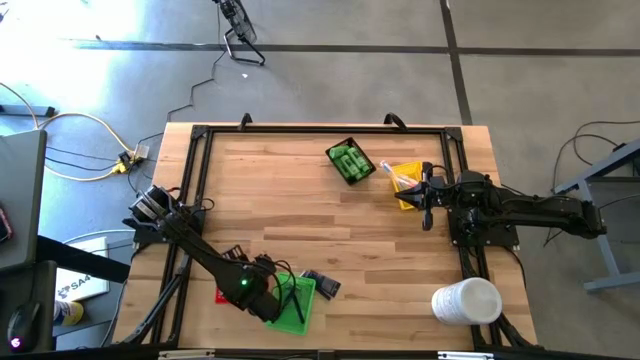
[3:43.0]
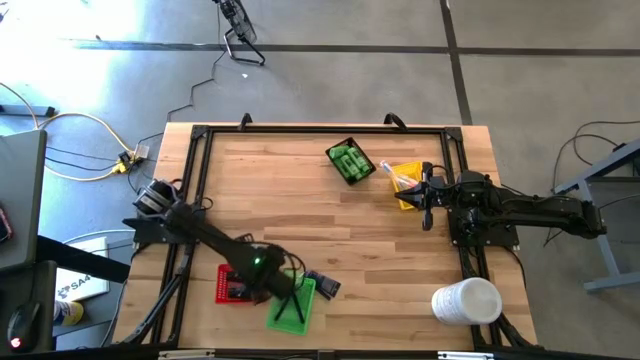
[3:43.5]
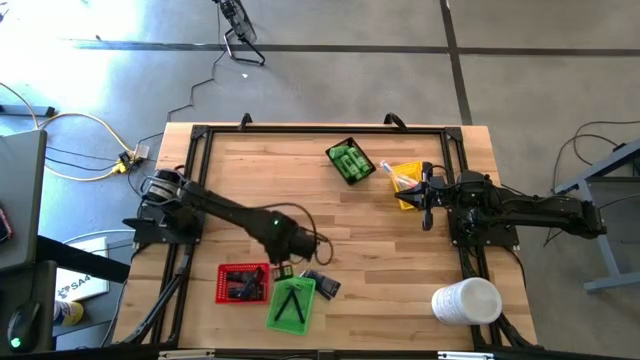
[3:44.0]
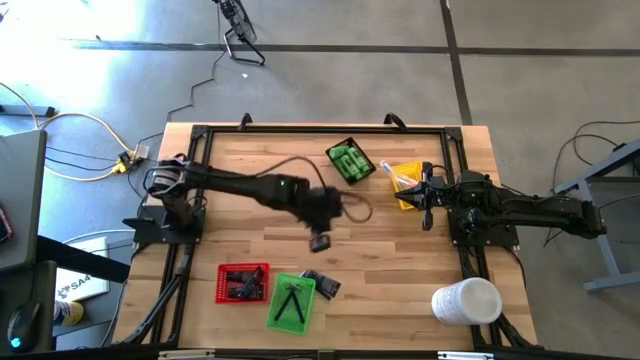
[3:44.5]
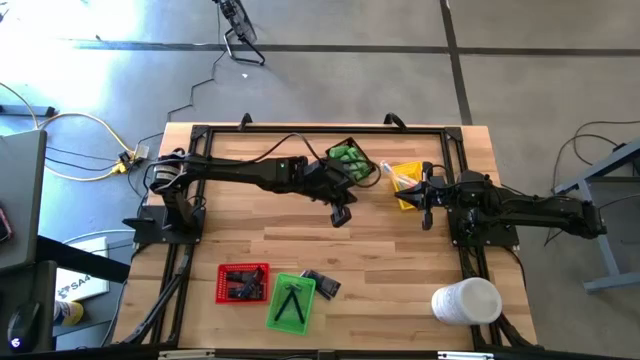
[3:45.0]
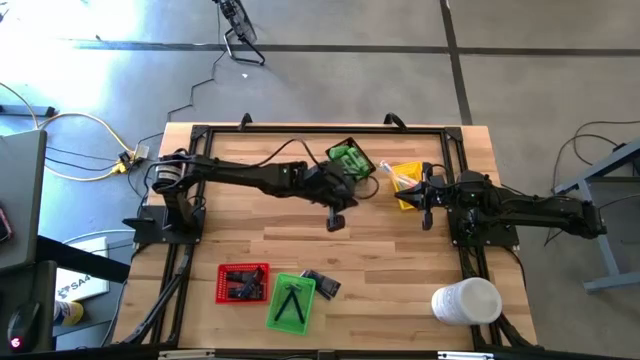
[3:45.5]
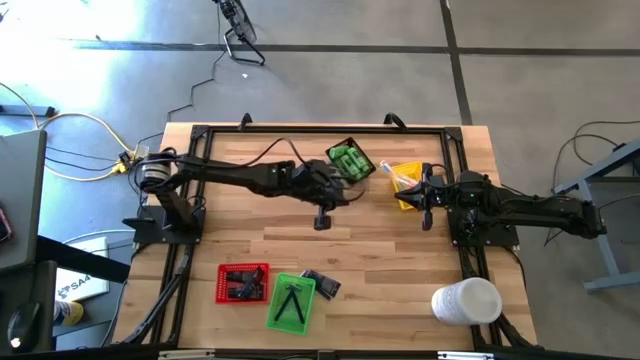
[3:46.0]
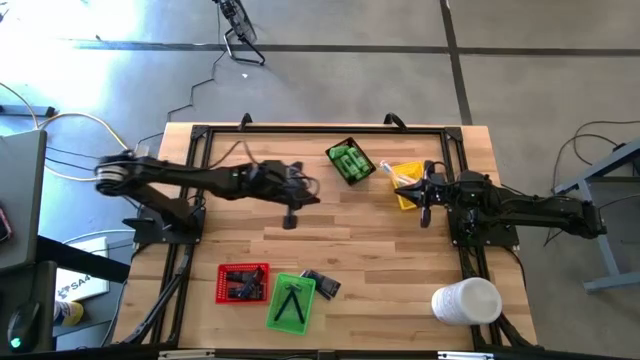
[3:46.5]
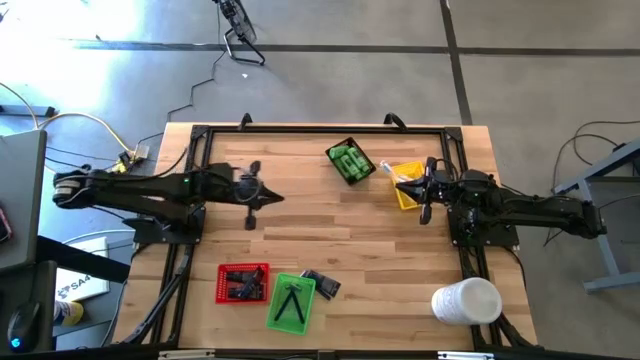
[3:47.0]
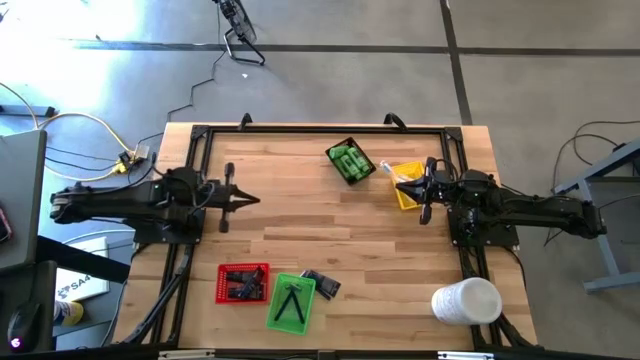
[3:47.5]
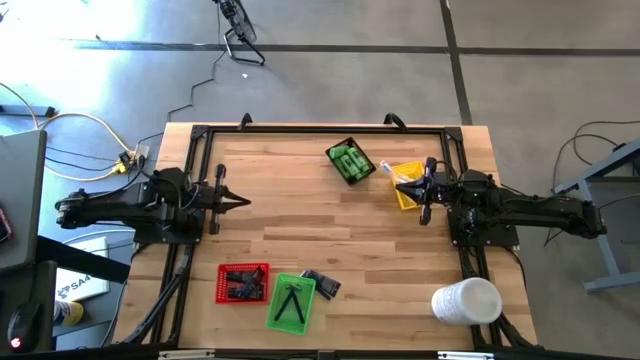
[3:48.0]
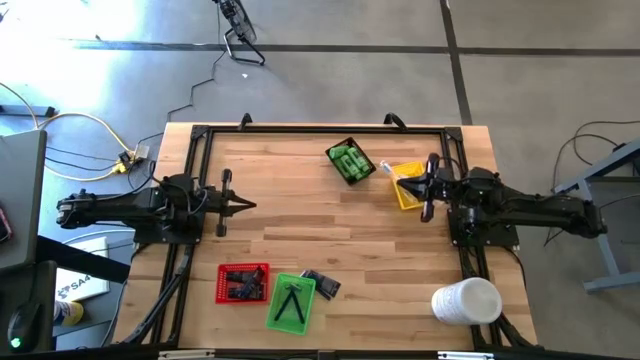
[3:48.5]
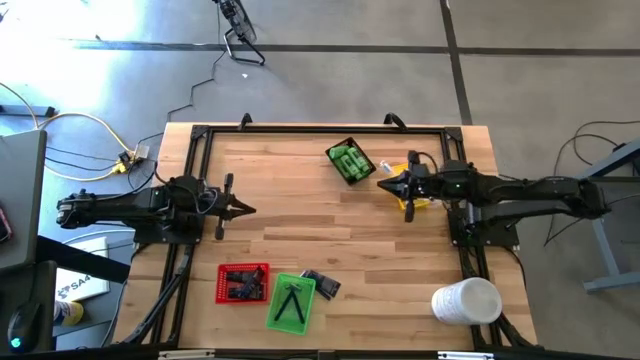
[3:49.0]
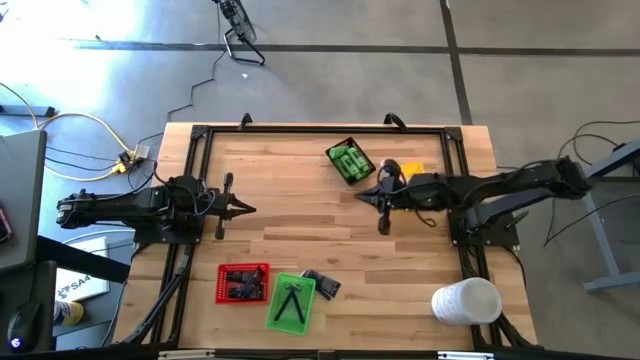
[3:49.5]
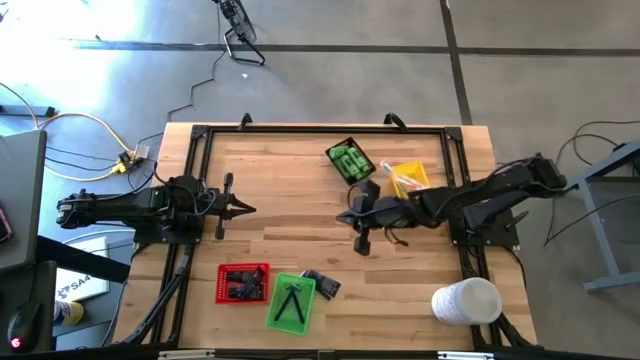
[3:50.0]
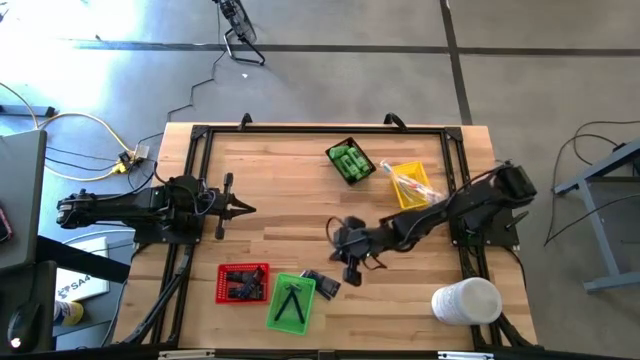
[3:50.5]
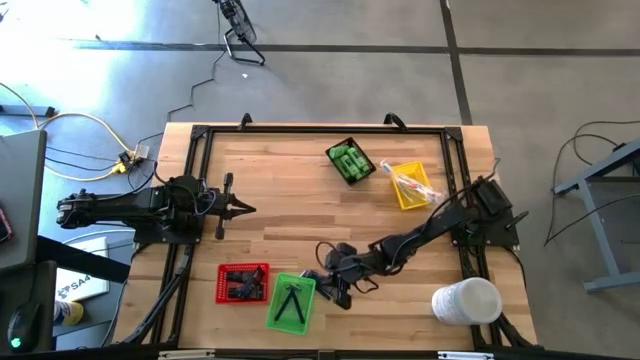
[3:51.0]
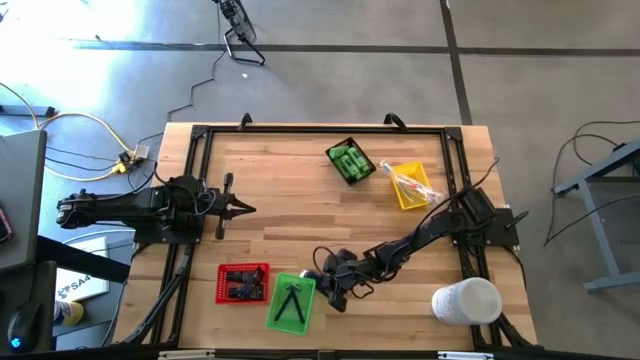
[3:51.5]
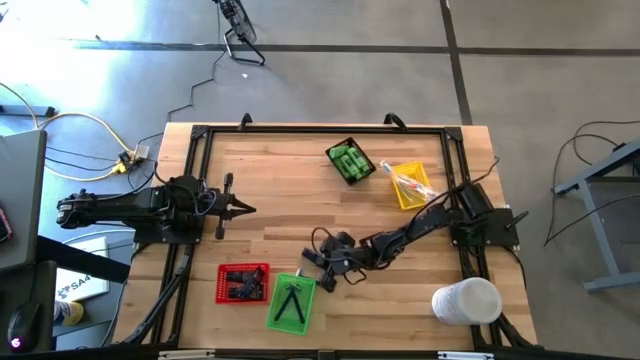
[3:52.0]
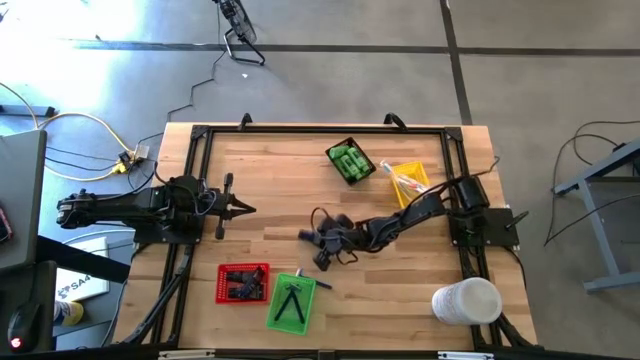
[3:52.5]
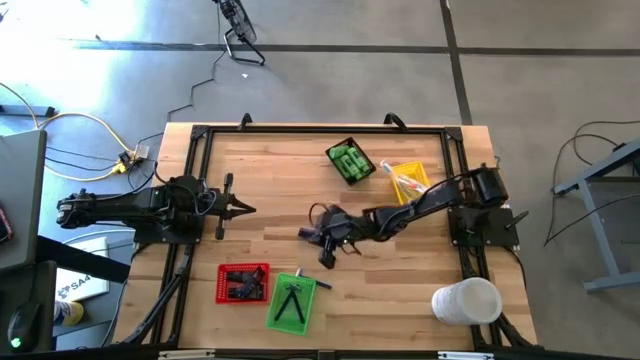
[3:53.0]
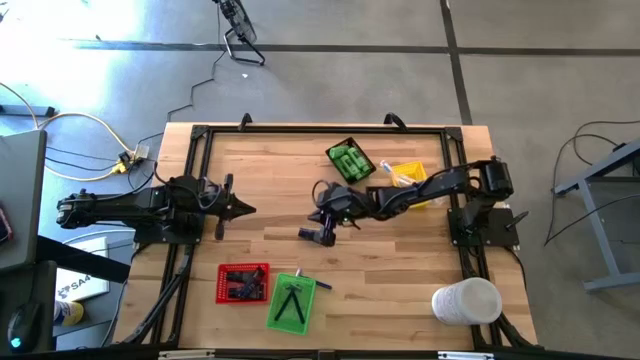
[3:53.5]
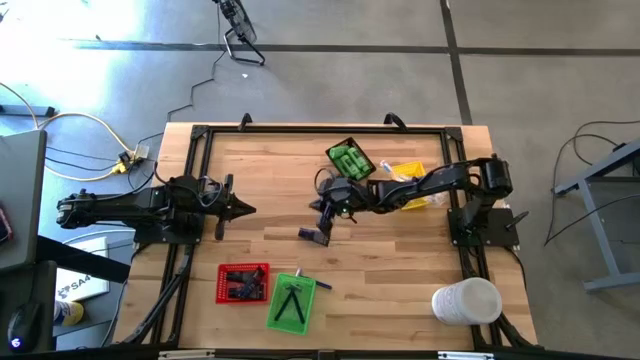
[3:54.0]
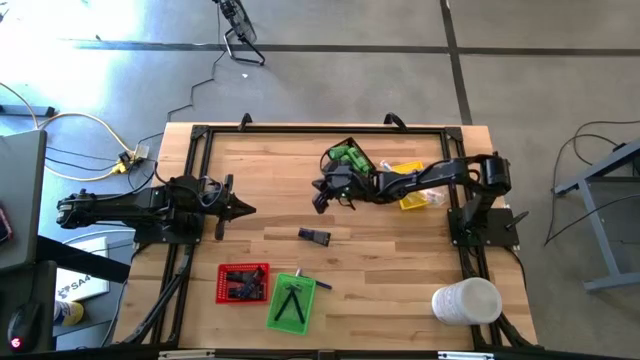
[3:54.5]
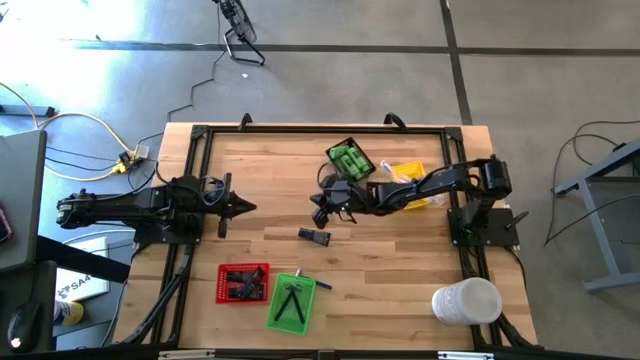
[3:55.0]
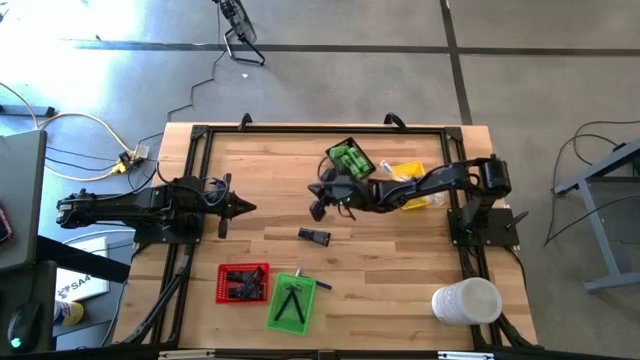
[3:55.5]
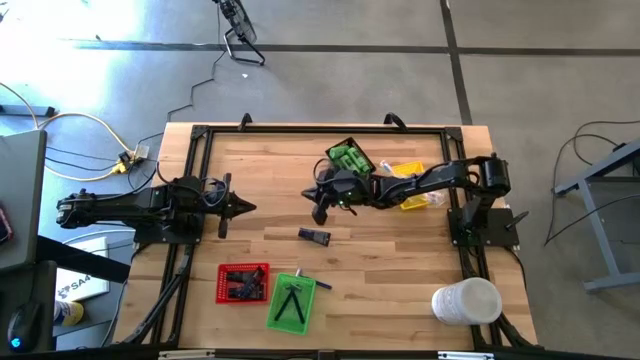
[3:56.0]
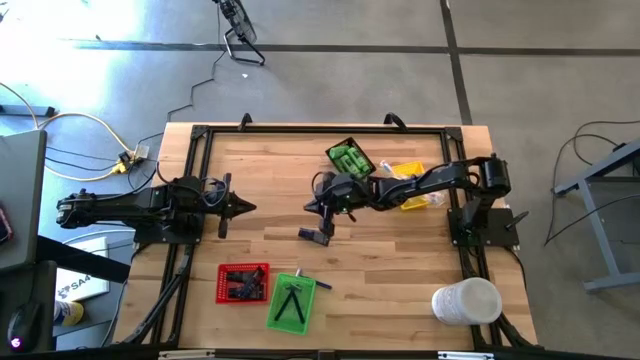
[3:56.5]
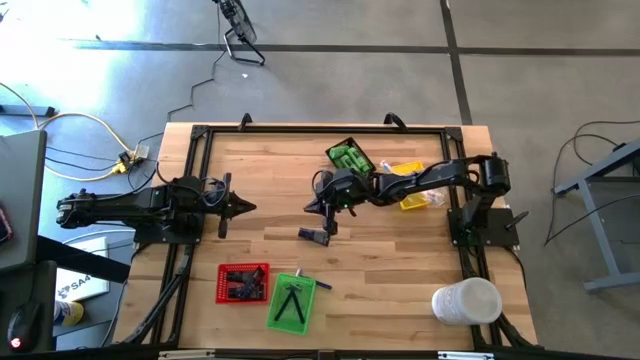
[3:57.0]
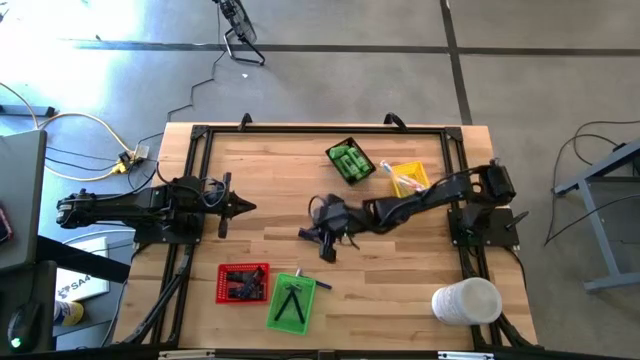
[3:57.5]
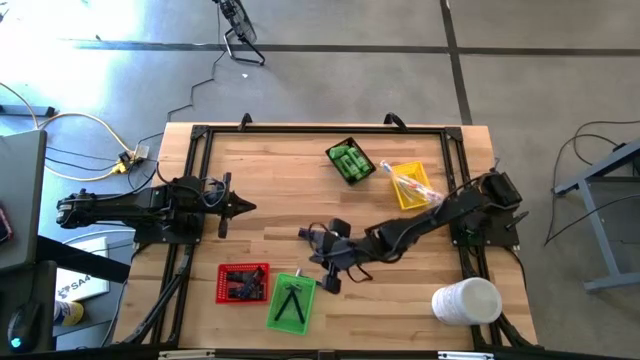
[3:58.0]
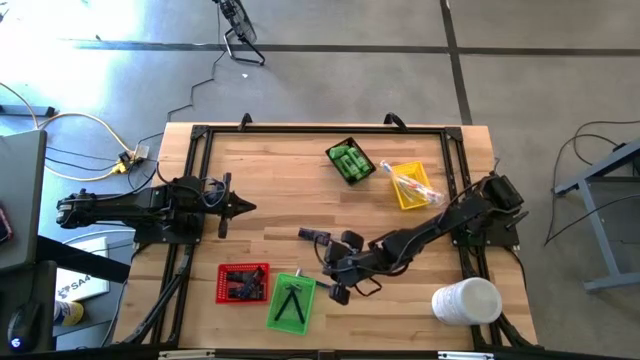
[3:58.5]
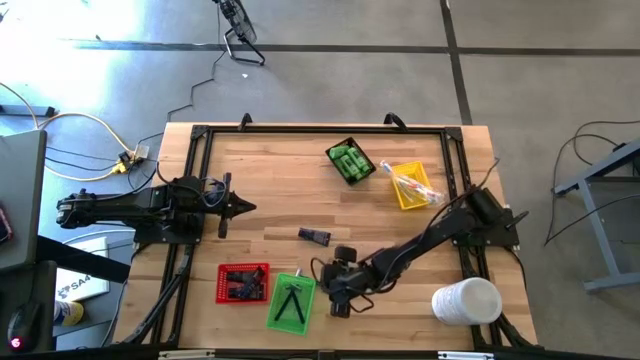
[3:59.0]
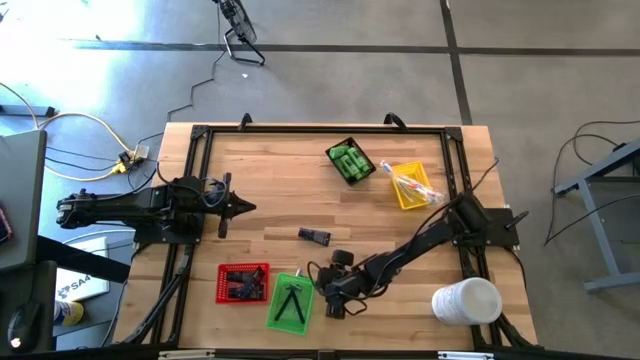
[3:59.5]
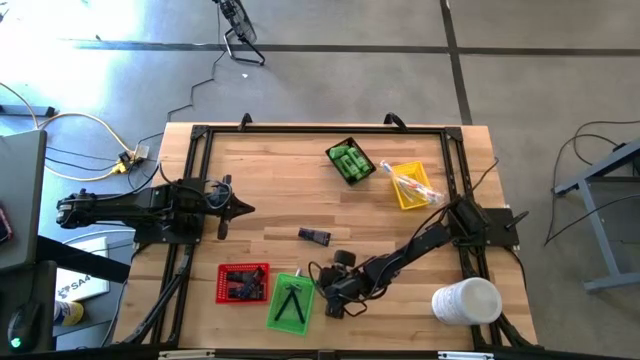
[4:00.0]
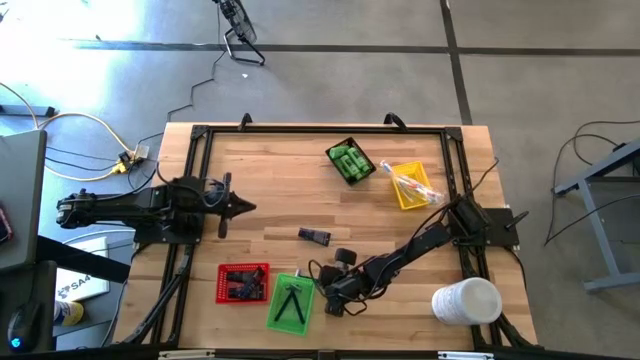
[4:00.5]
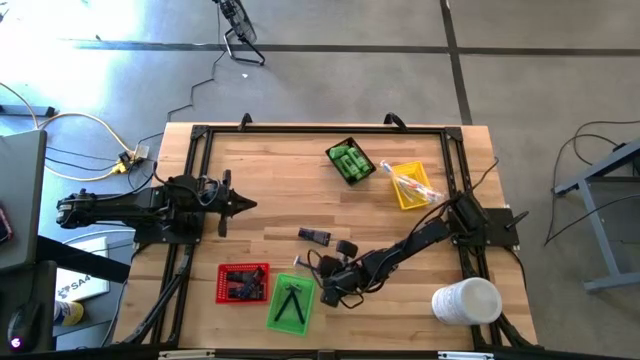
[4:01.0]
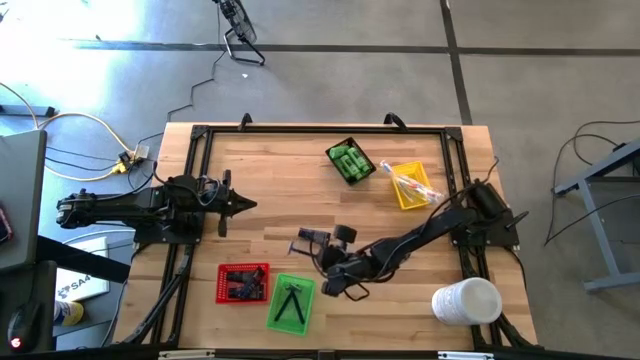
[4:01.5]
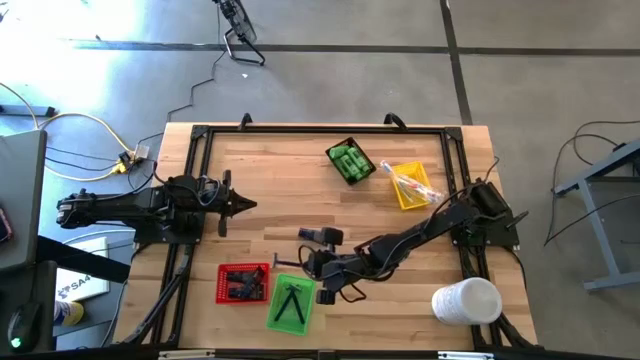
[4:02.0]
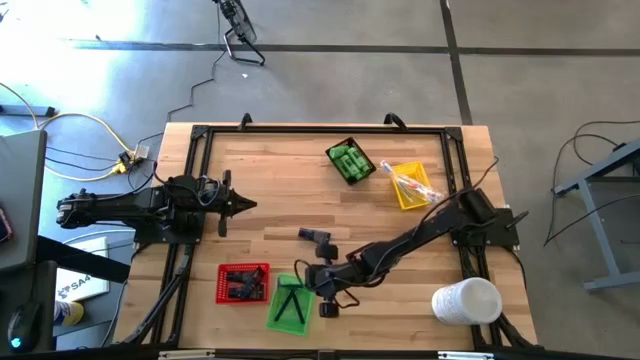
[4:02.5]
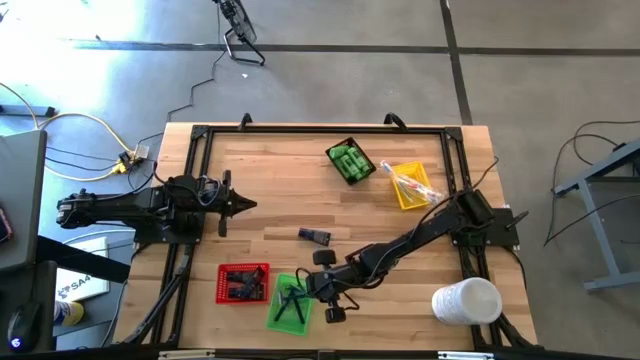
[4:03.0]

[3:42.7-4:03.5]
Task: Pick & Place Travel size toiletries
Put the razor into the green bin

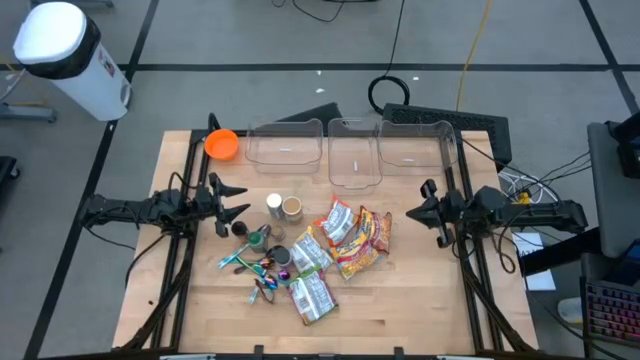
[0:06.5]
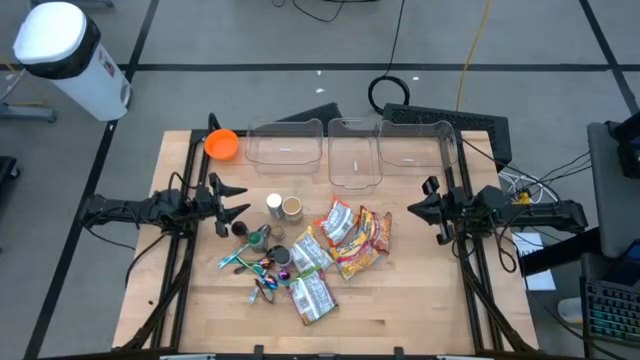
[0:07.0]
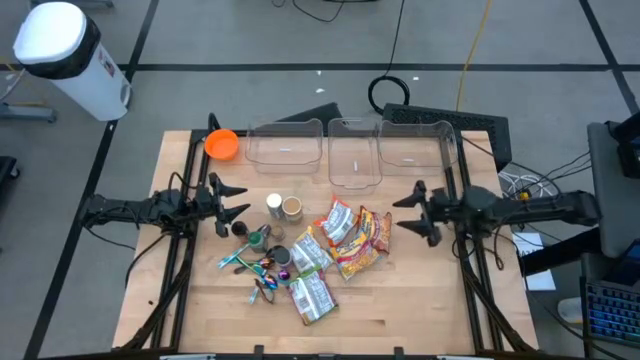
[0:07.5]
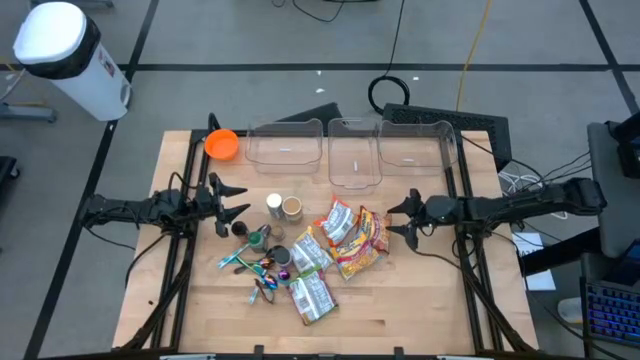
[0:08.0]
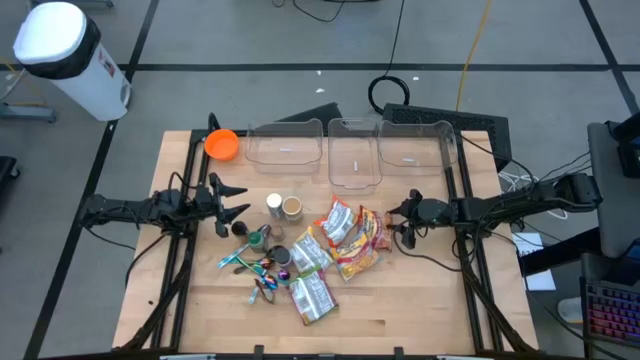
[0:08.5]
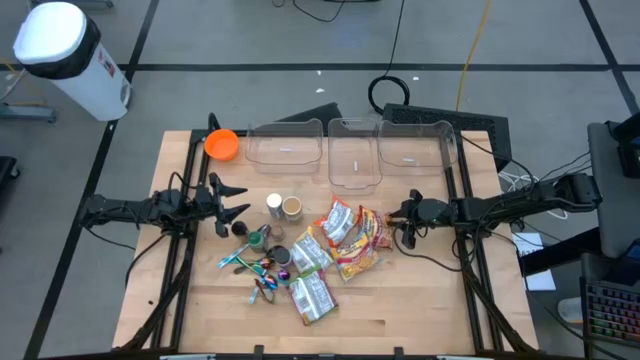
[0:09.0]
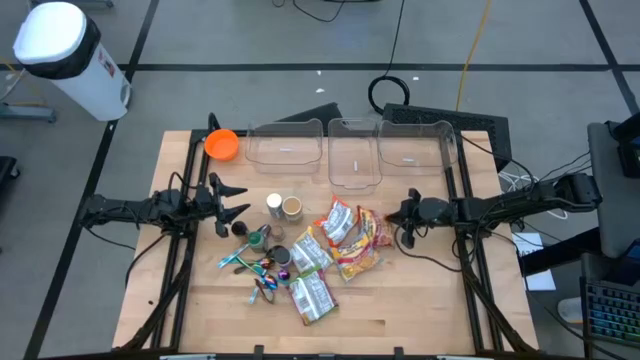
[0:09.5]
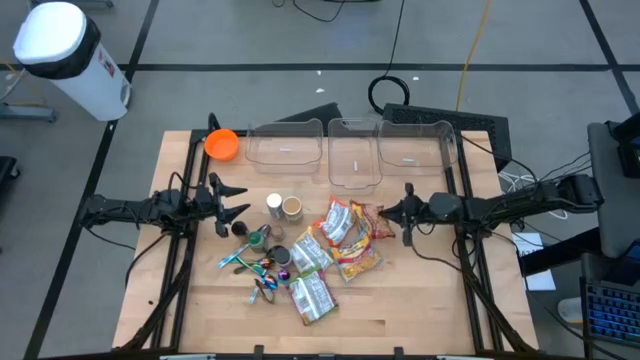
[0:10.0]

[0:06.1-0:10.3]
Task: Pick & Place Food Item
Put the red noodle pack into the right transparent bin
